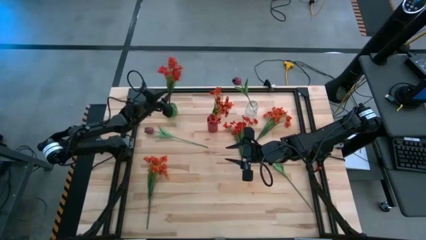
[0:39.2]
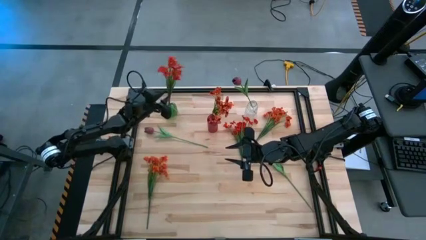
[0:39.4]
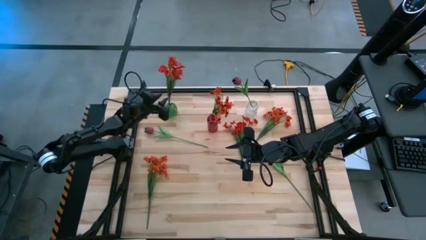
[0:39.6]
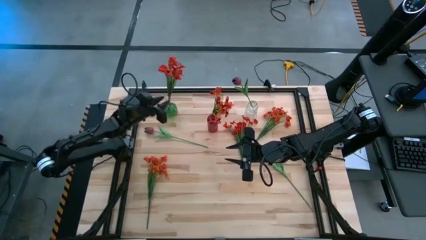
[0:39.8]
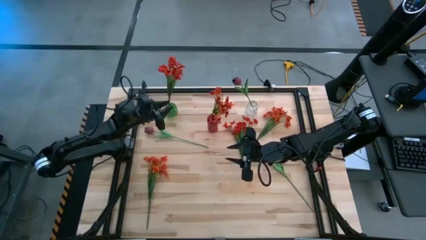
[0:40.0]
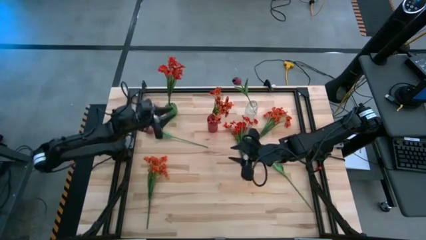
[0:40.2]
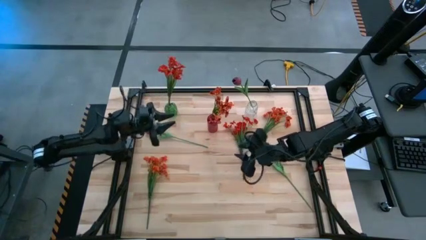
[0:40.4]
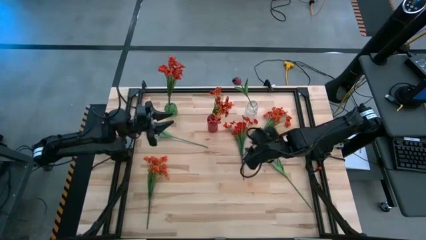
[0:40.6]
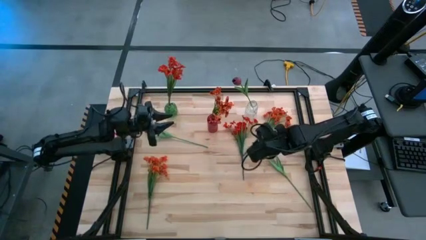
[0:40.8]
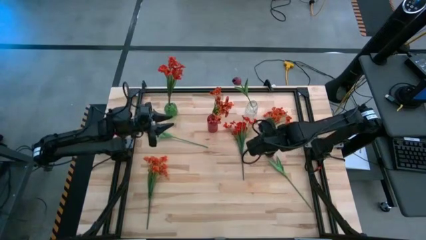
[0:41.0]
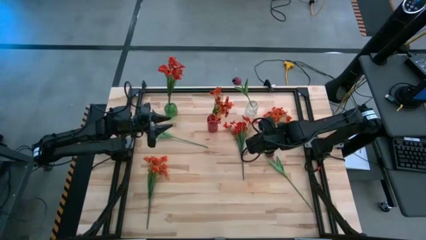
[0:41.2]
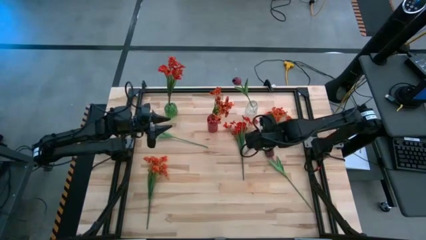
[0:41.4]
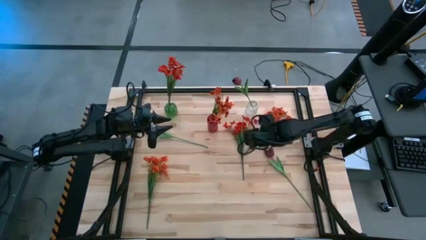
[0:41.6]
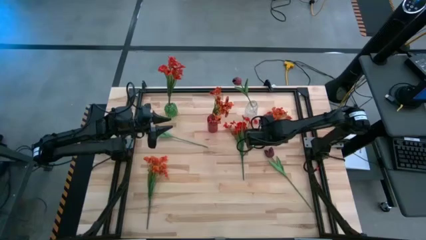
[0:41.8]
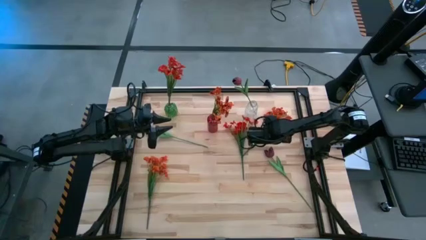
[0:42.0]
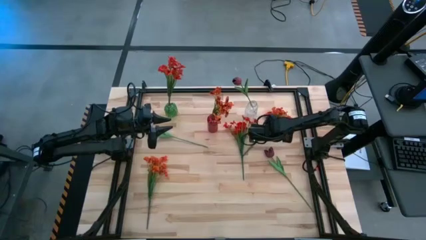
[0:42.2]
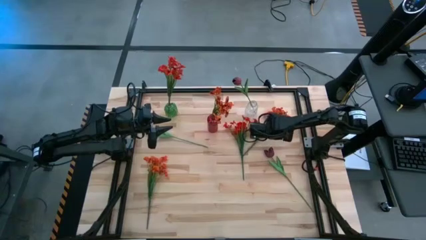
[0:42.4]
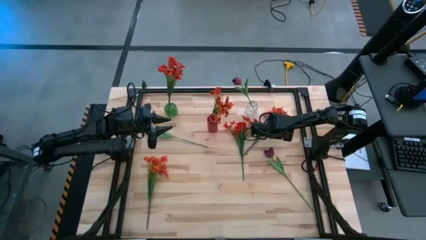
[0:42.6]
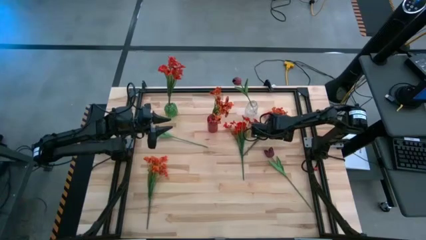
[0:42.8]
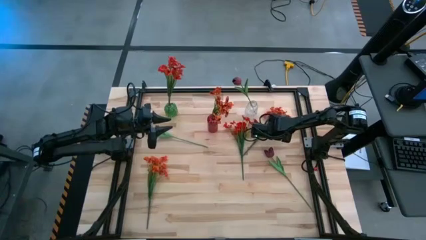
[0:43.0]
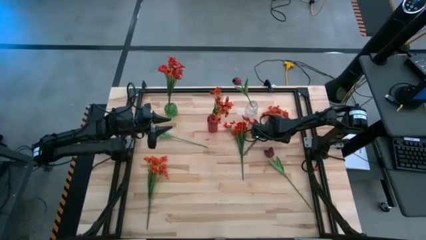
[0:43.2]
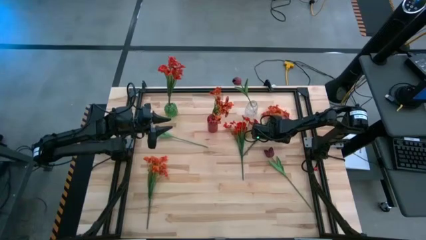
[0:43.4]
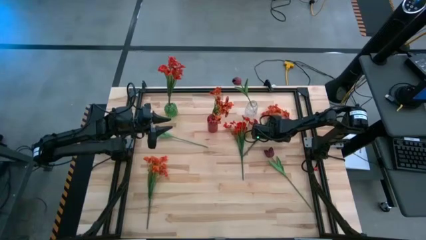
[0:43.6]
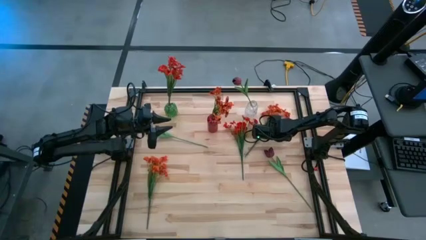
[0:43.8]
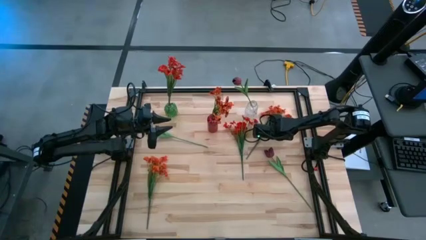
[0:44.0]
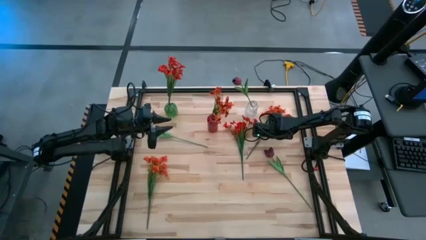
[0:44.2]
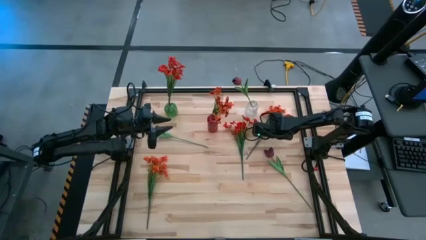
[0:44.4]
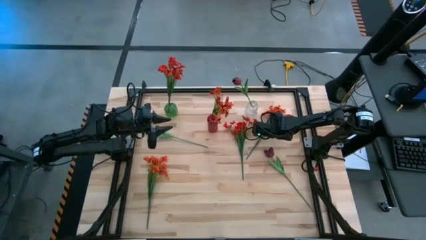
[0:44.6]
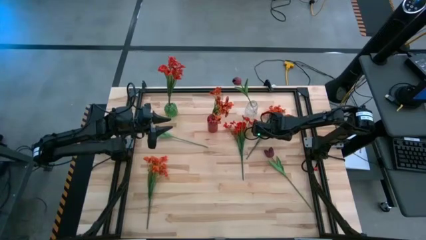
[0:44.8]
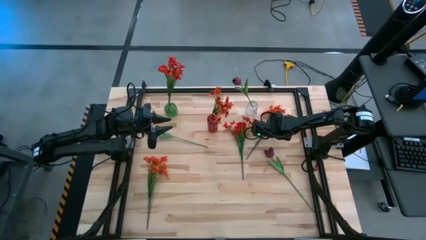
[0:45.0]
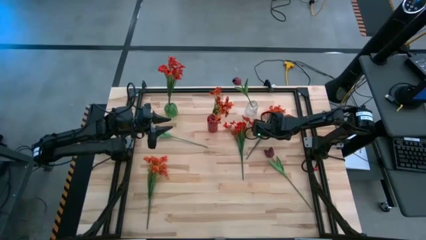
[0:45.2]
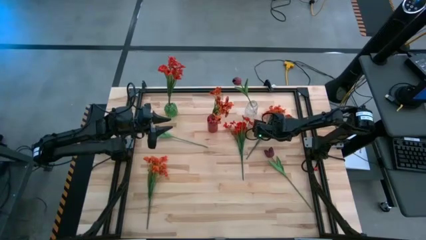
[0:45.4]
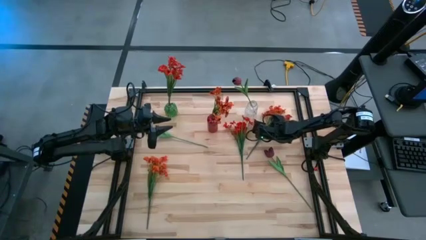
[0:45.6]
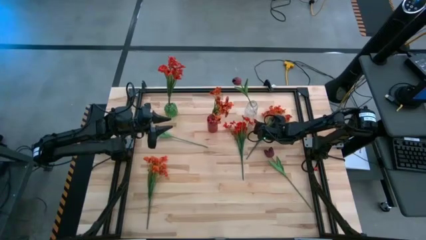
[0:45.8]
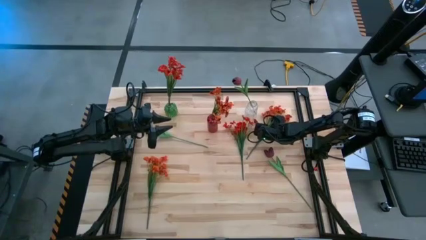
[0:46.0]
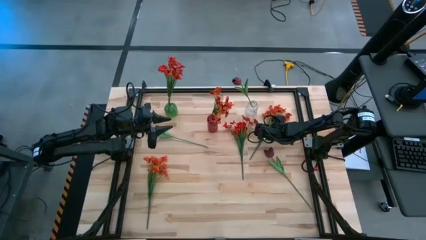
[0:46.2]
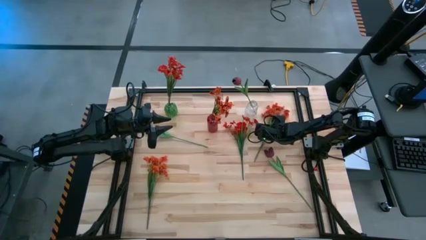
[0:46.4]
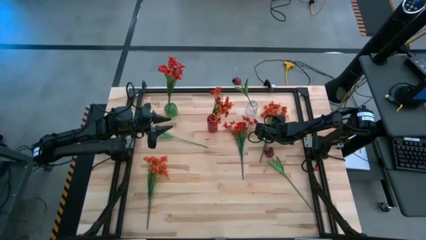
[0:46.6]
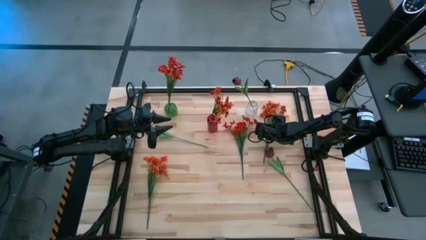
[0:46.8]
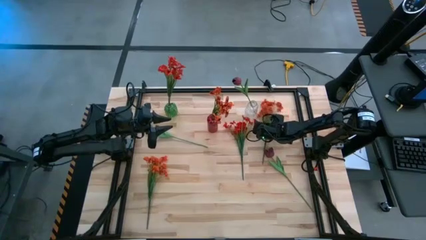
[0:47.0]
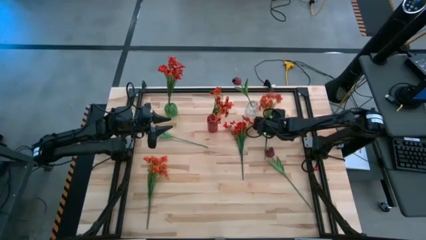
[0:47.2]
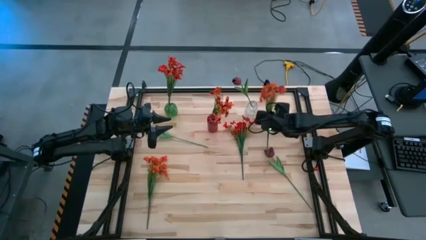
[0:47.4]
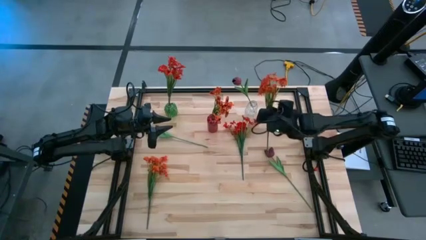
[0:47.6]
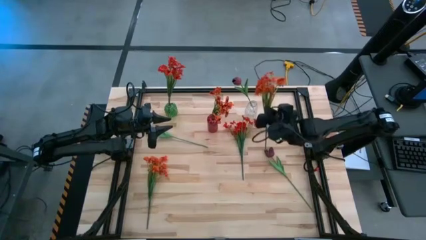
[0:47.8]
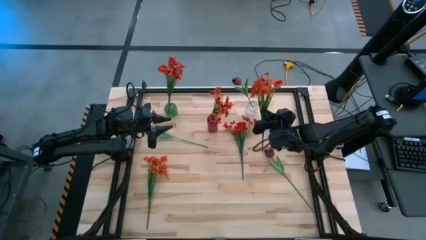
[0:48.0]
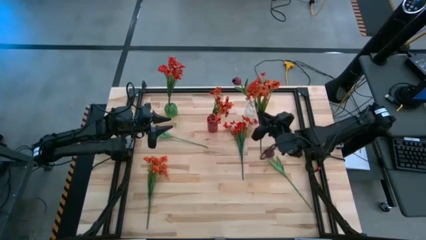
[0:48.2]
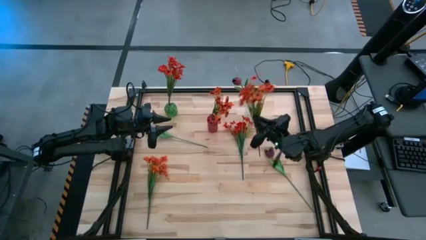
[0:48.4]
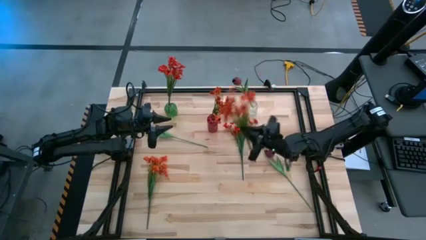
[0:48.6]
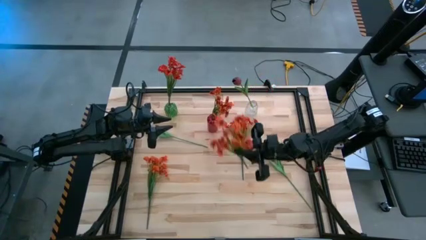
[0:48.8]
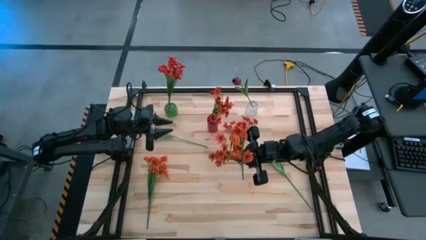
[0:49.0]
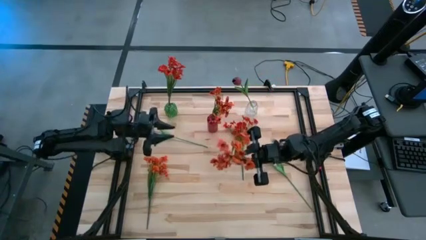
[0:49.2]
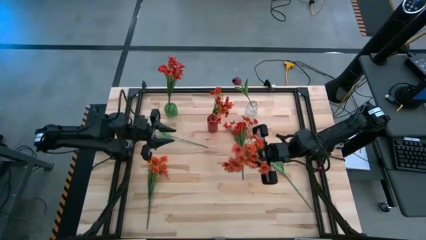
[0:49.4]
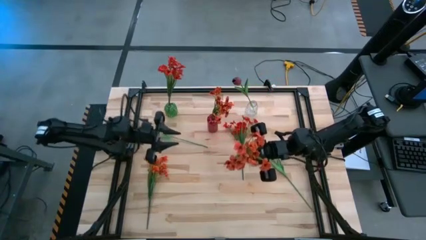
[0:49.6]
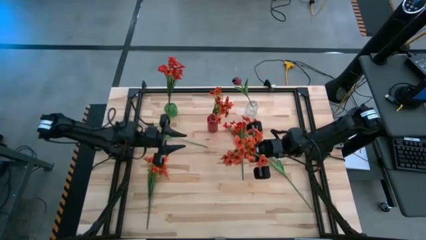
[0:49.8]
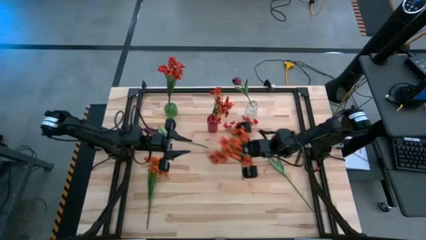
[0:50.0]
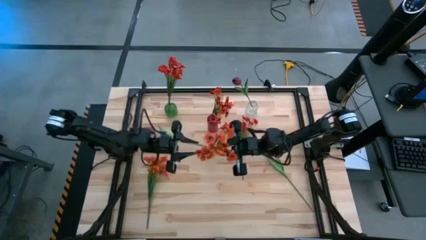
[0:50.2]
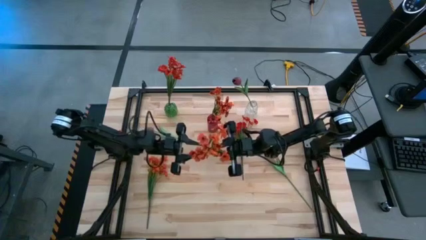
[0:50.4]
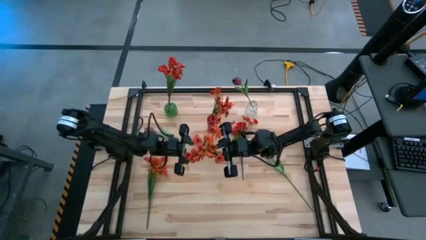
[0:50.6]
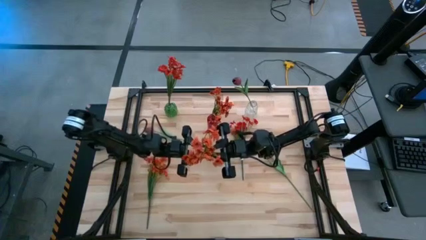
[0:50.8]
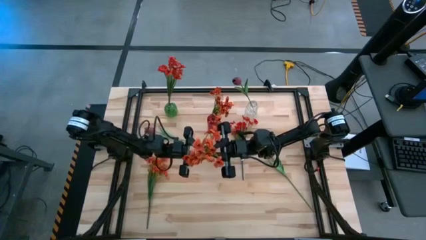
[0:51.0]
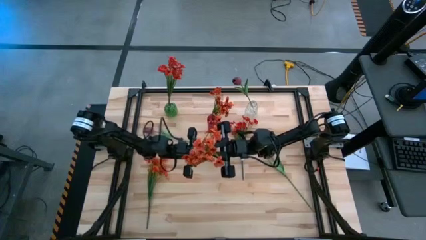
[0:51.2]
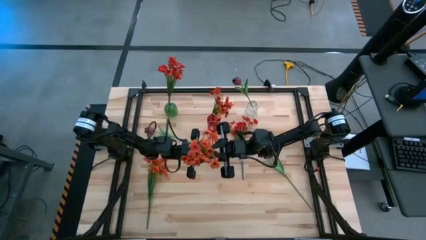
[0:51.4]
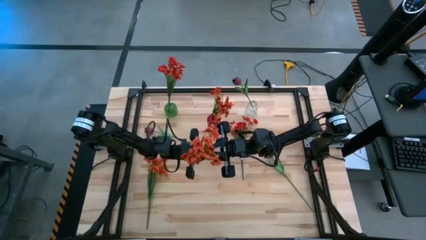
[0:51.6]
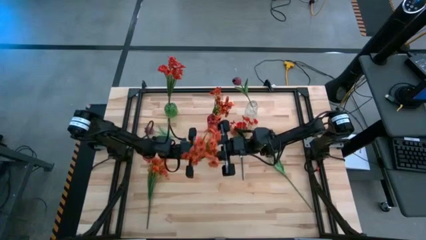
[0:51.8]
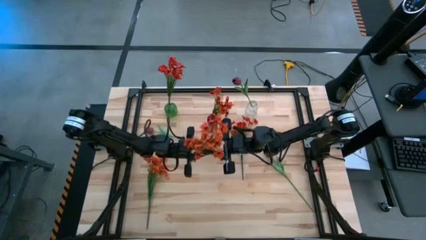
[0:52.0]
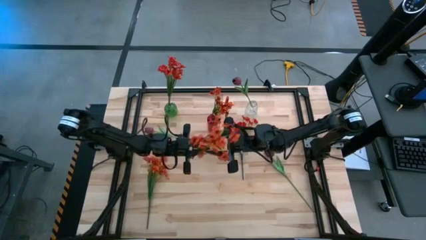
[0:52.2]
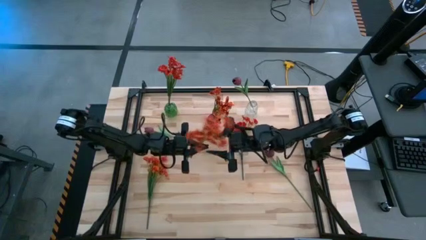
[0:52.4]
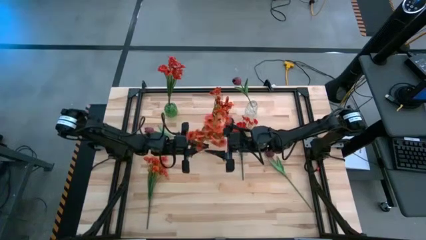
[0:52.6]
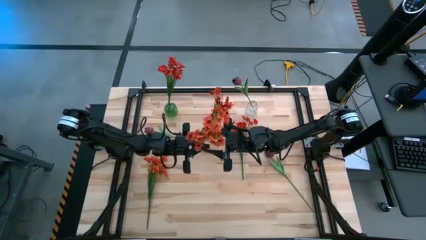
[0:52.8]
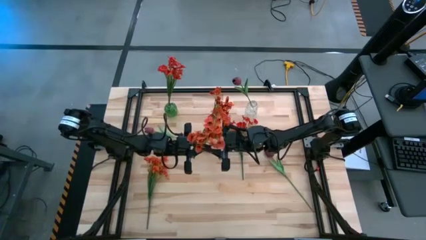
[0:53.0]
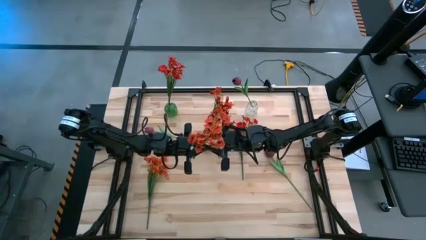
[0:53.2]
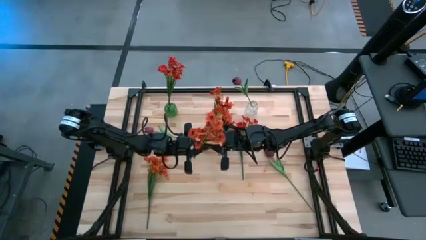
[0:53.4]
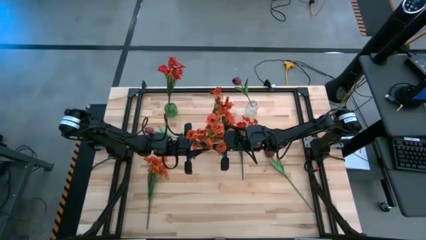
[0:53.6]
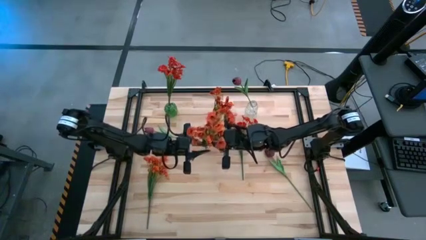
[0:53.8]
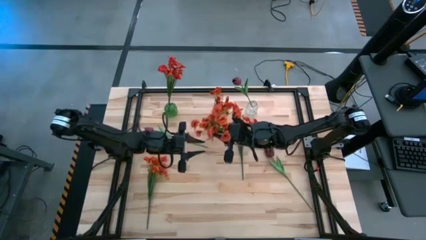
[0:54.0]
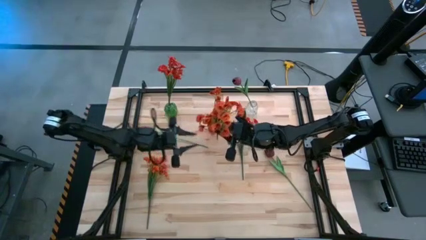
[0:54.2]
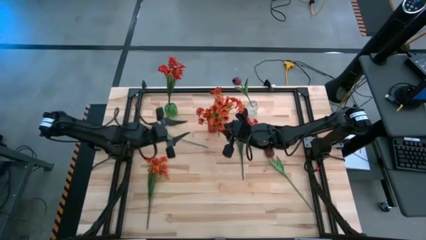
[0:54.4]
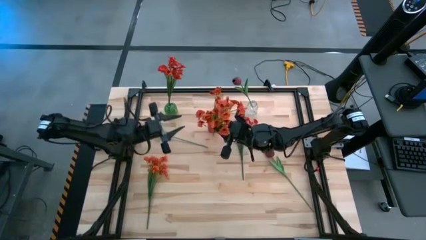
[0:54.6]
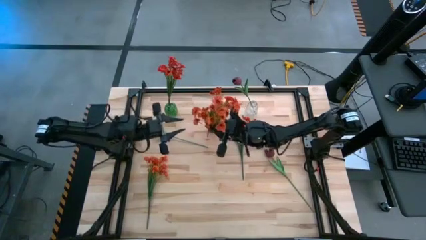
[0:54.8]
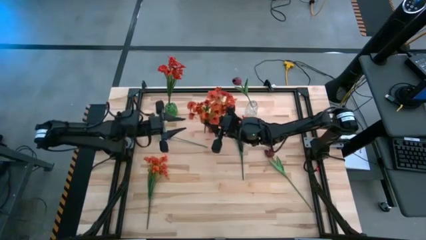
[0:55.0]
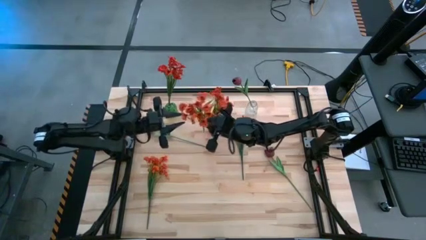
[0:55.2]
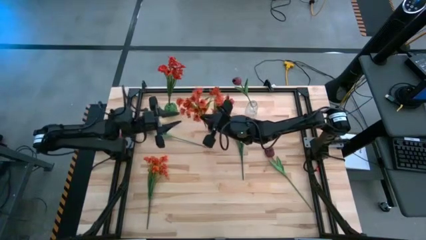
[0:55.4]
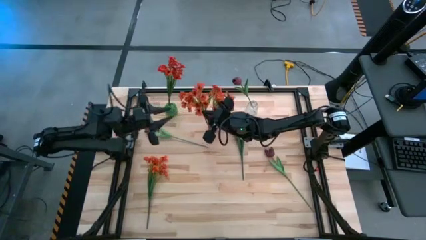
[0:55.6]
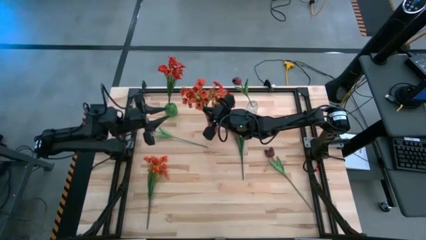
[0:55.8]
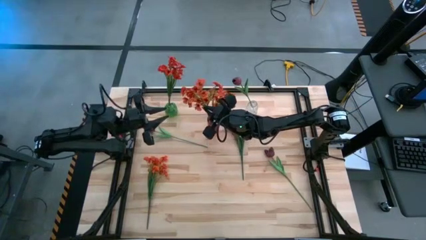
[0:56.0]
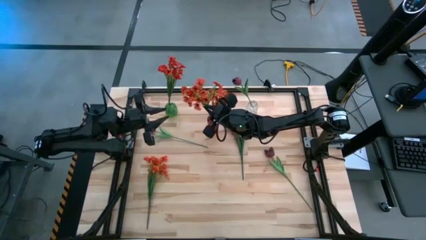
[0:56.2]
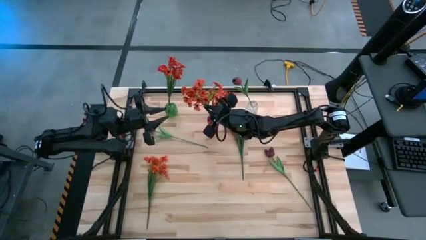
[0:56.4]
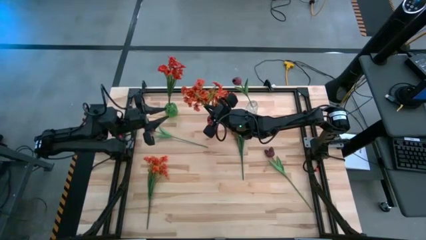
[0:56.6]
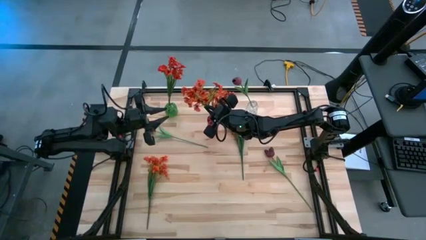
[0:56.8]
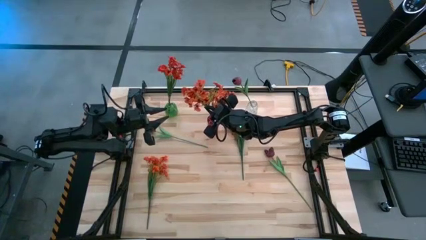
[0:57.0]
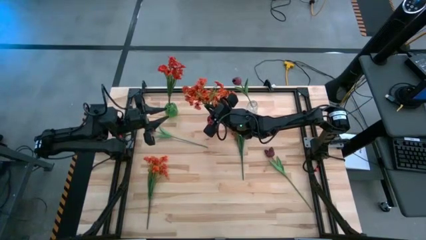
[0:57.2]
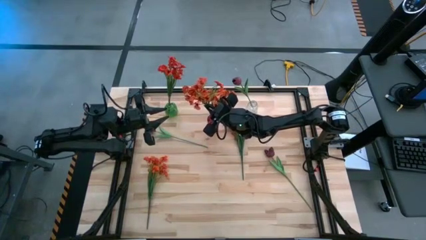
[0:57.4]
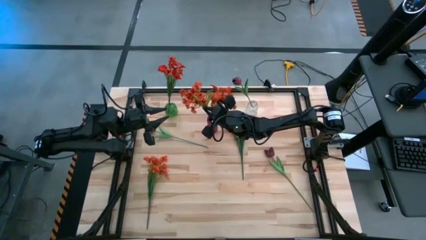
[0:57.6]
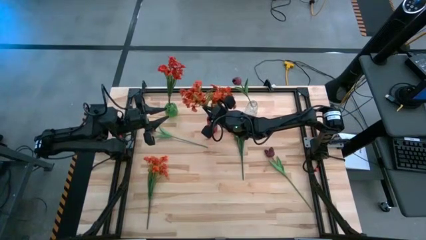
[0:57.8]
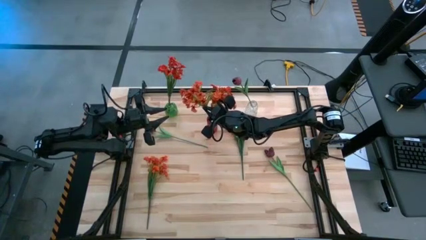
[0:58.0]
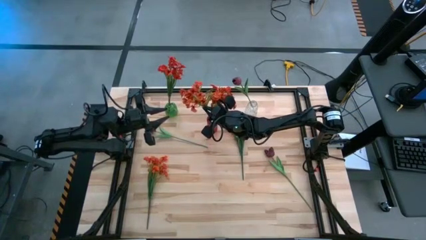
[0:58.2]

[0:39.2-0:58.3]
Task: Sort flowers into vase by color
Put the top orange flowers into the red vase
